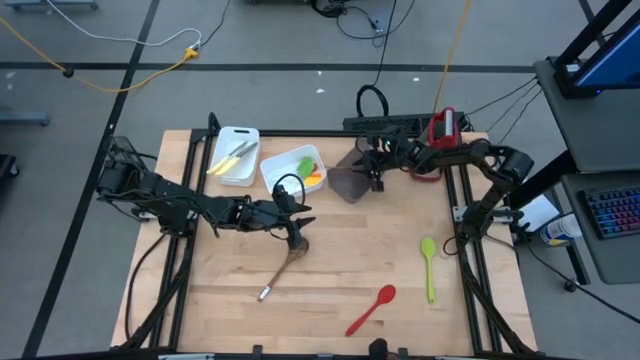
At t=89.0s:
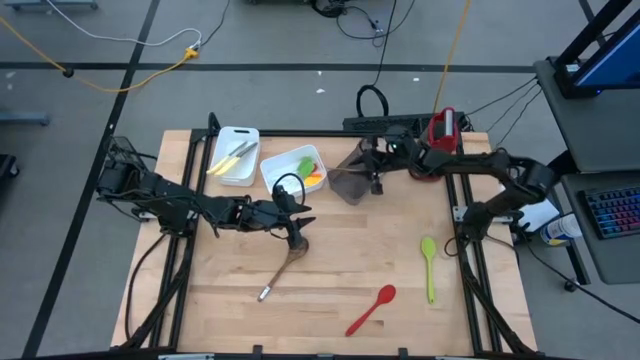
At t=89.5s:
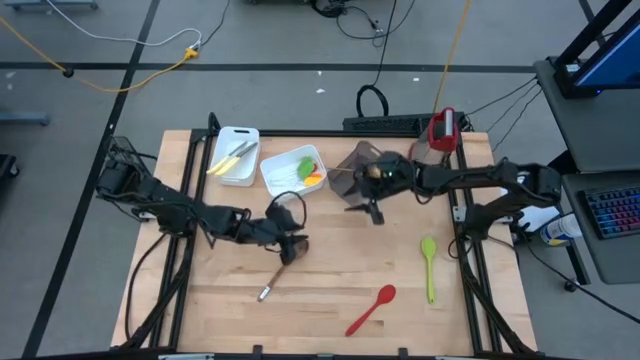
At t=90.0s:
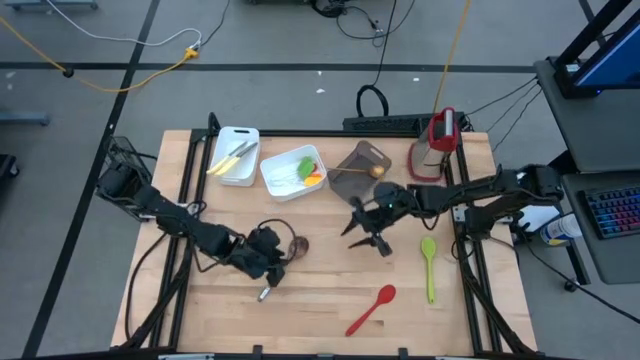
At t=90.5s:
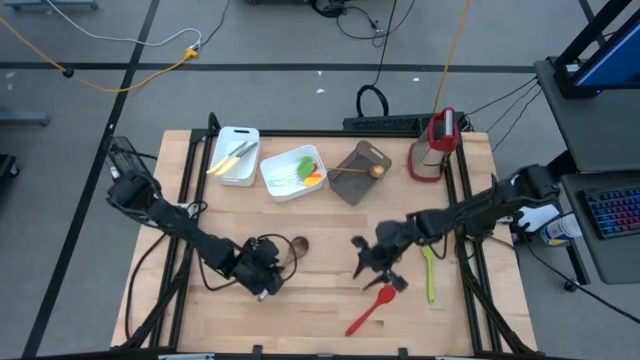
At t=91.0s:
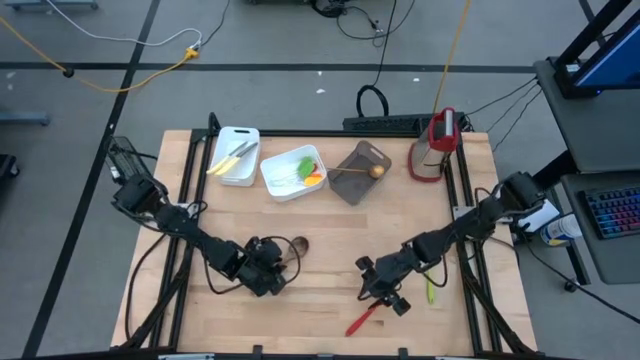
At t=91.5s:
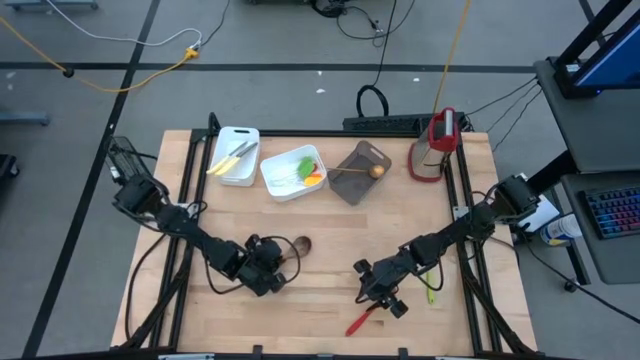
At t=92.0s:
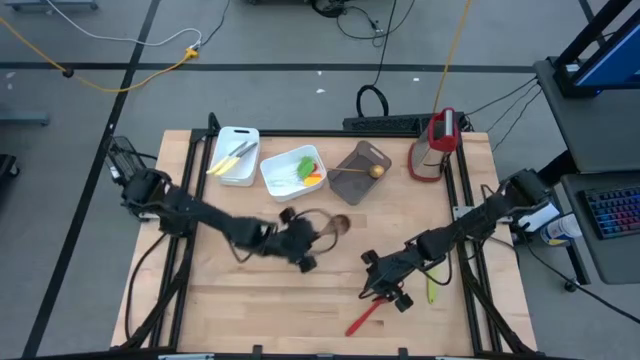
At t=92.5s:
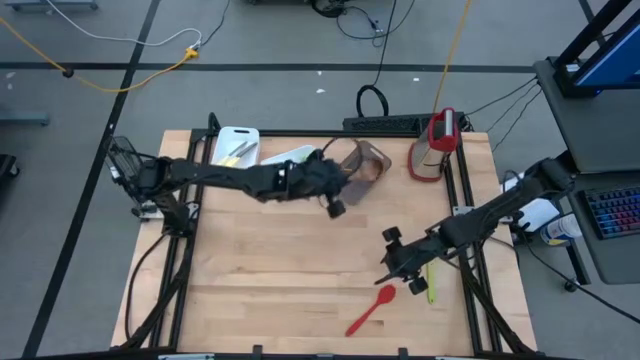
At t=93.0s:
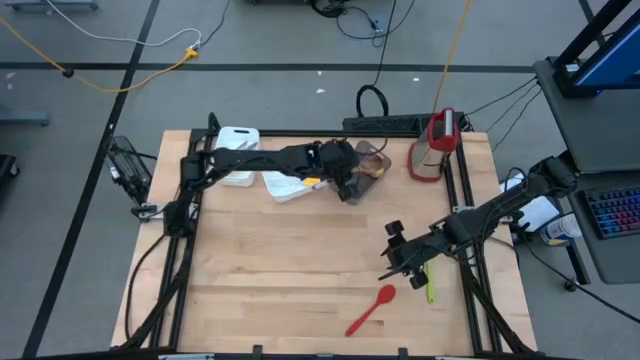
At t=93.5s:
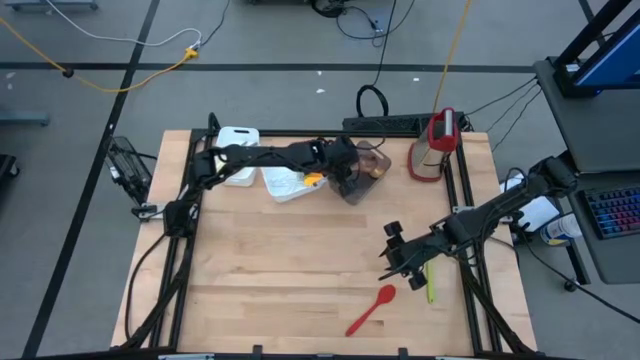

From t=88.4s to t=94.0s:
Task: Pick & Place Kitchen Items
Put the brown serving spoon into the black bin

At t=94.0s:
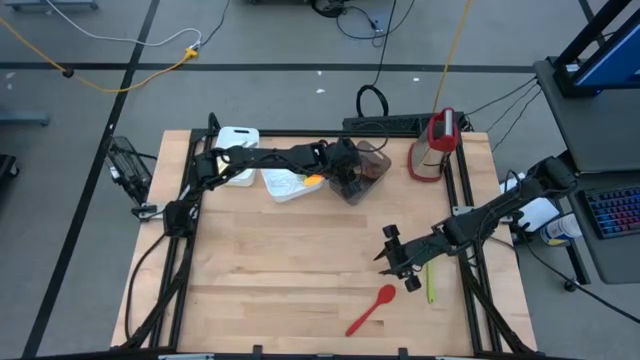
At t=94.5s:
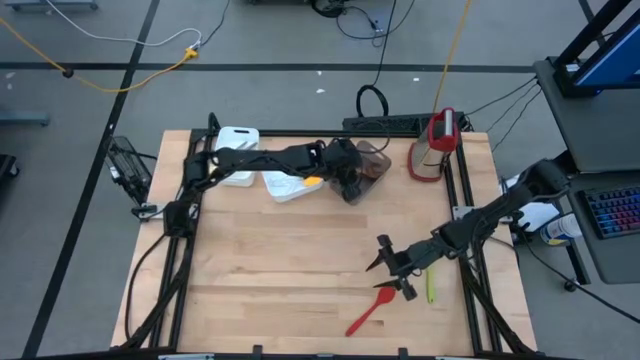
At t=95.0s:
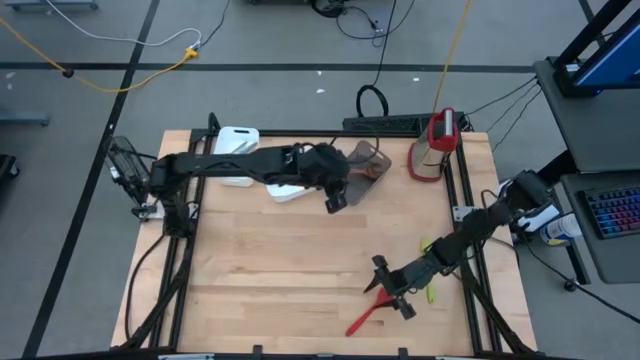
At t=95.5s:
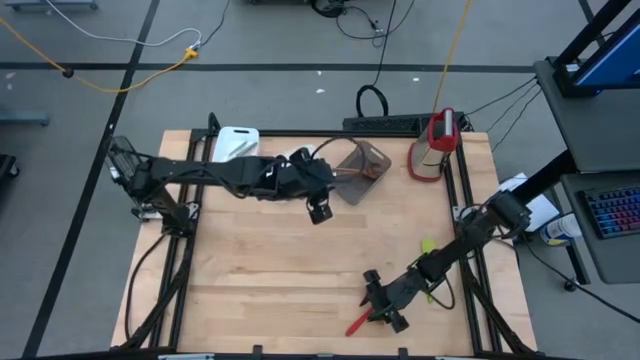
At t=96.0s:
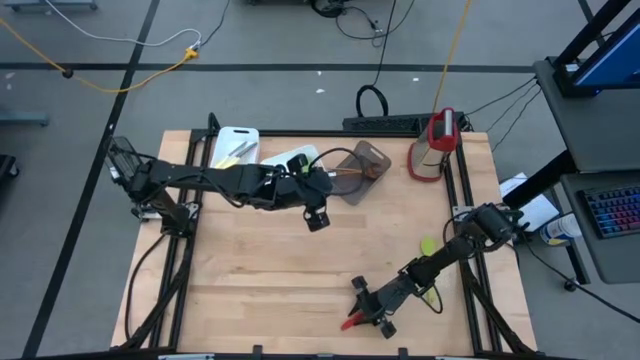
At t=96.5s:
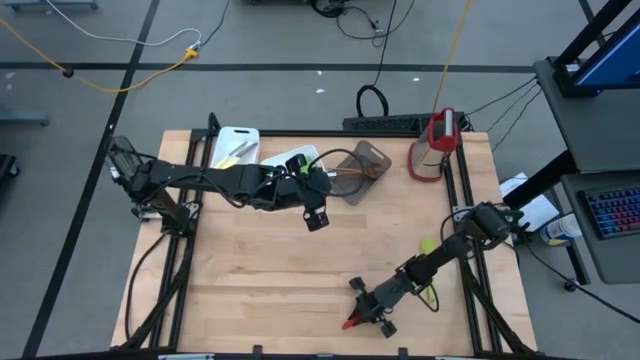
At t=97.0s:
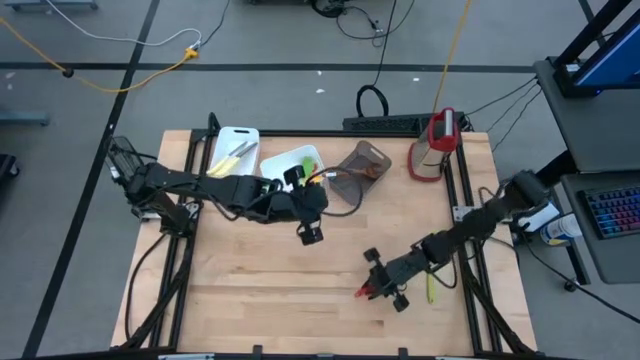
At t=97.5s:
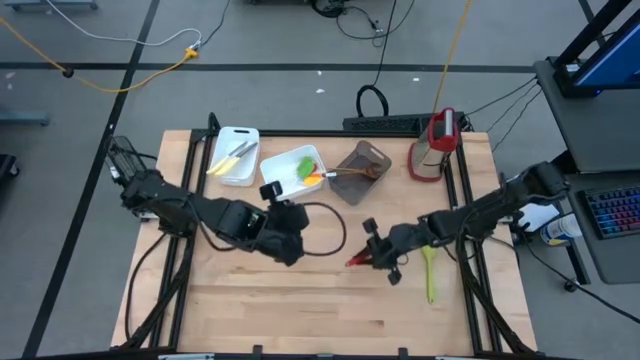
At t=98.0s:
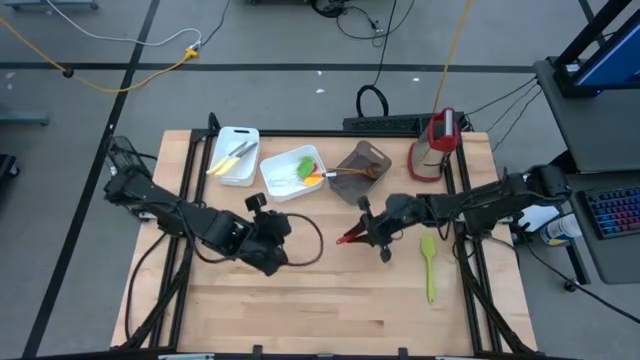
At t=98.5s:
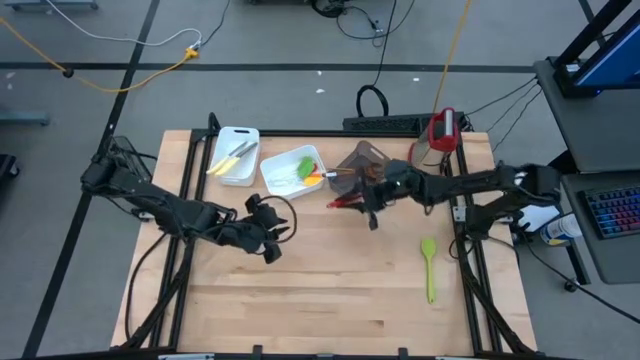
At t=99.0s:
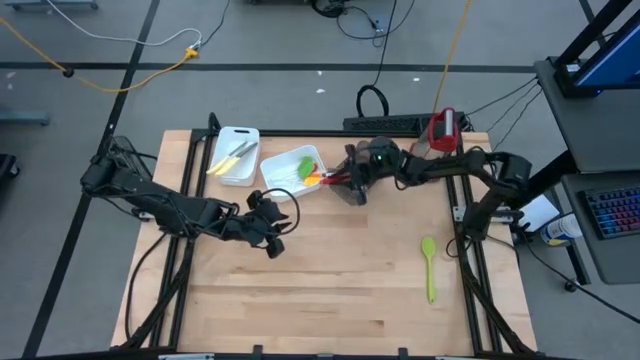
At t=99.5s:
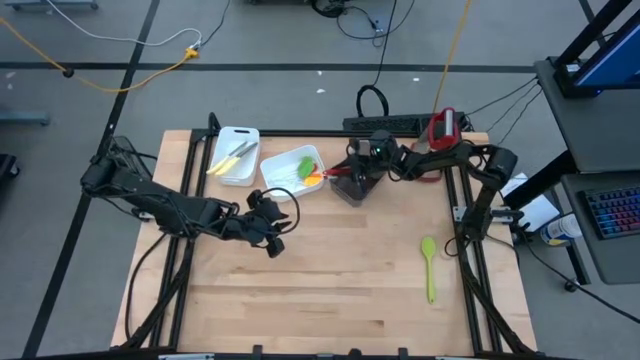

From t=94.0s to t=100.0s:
Put the red serving spoon into the black bin

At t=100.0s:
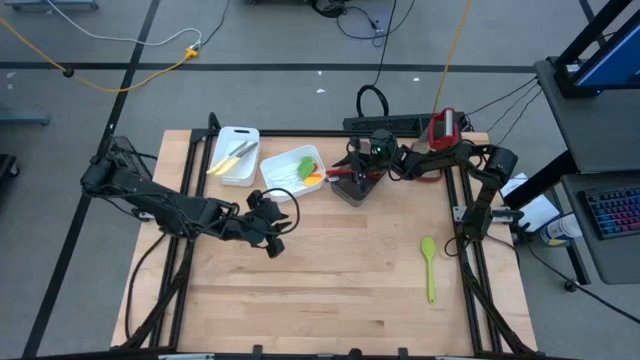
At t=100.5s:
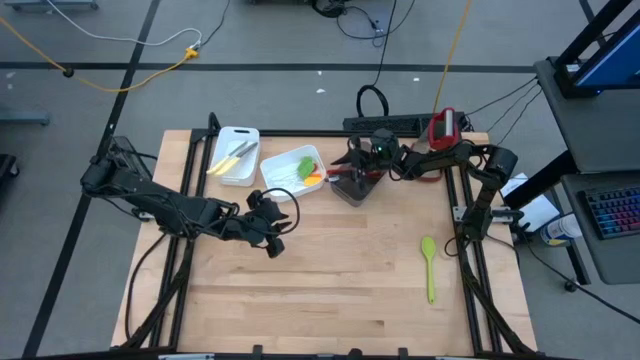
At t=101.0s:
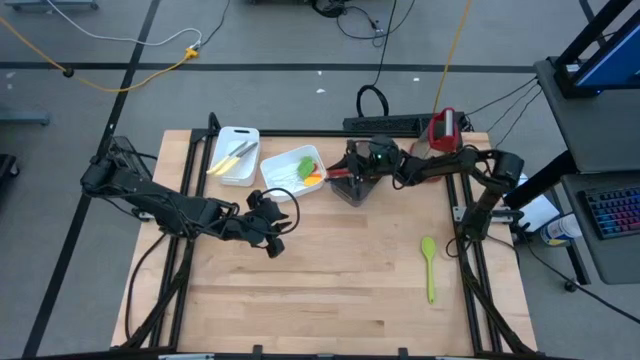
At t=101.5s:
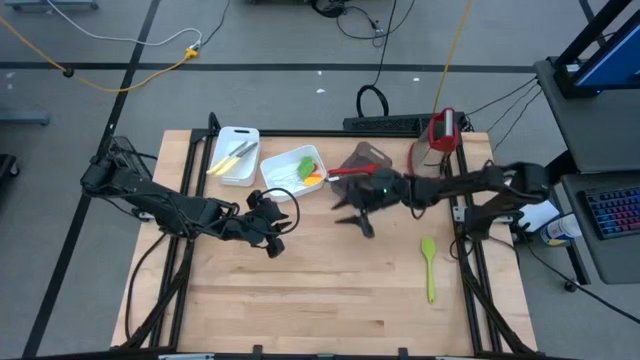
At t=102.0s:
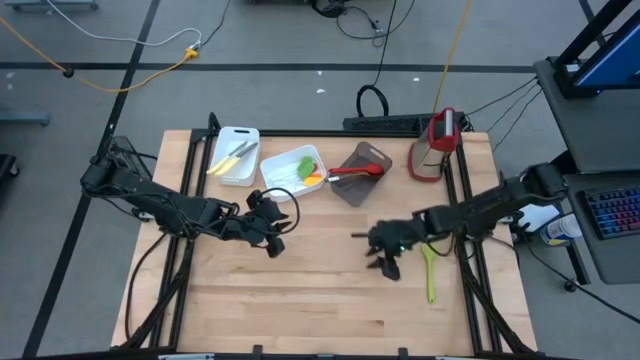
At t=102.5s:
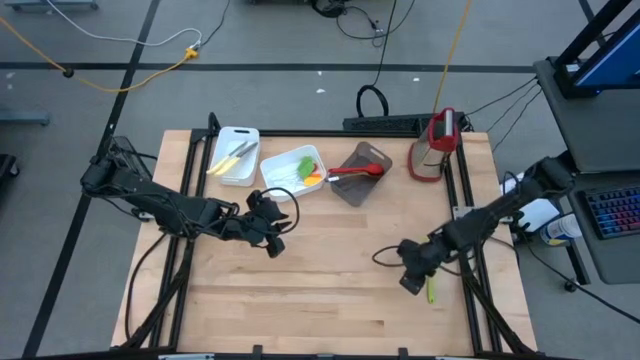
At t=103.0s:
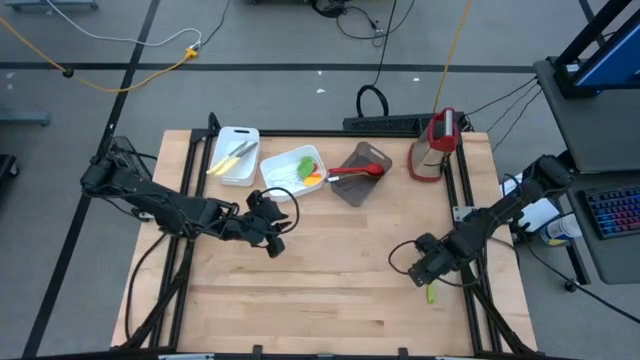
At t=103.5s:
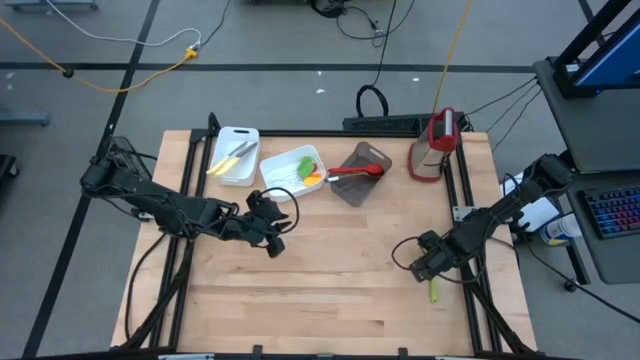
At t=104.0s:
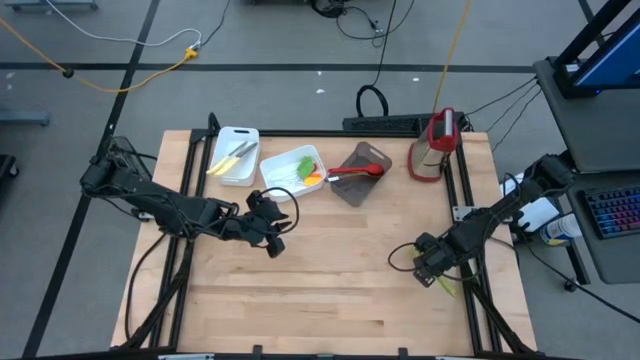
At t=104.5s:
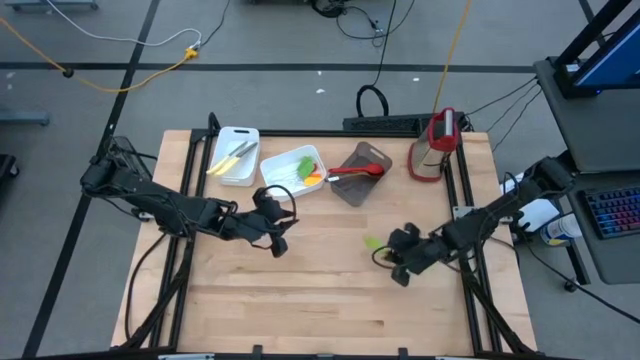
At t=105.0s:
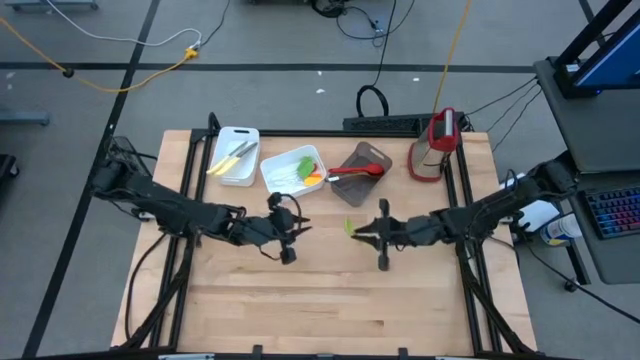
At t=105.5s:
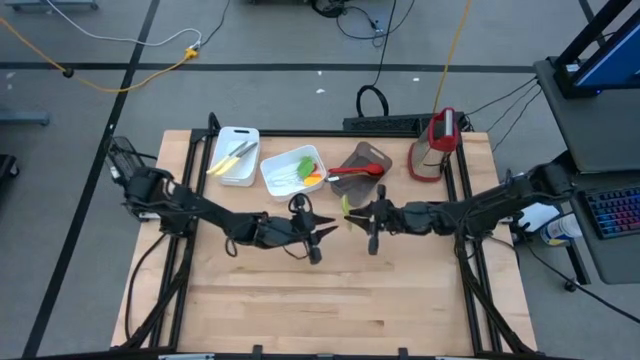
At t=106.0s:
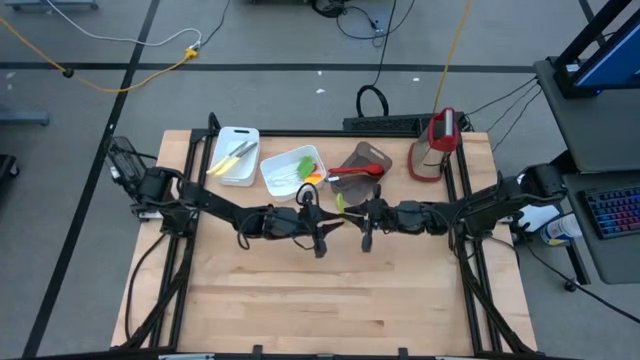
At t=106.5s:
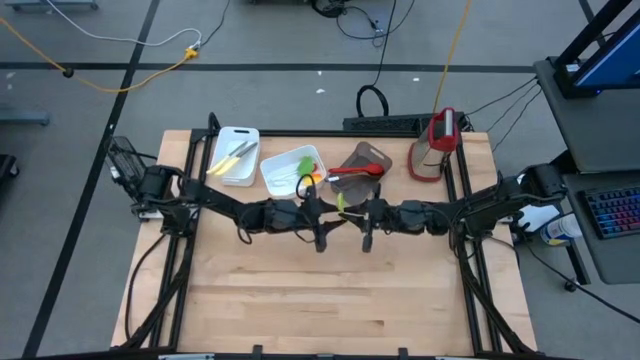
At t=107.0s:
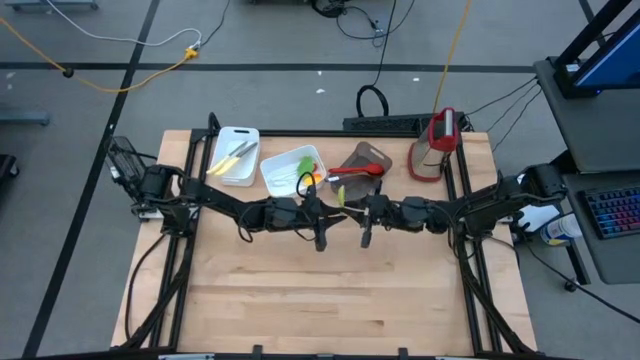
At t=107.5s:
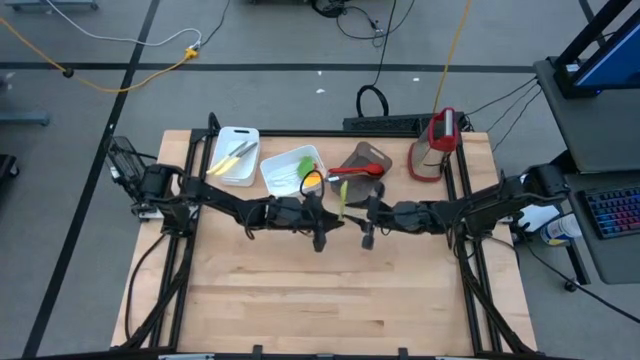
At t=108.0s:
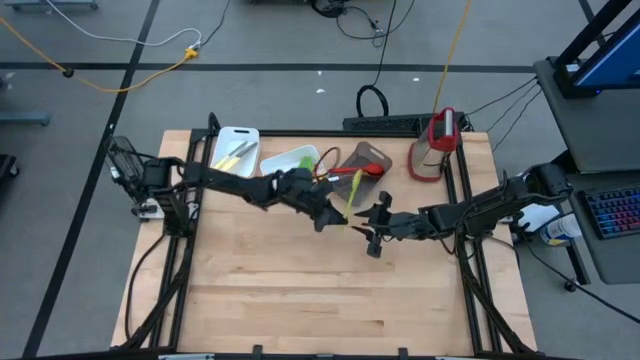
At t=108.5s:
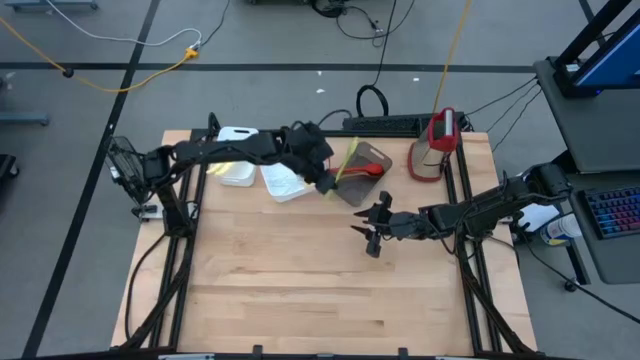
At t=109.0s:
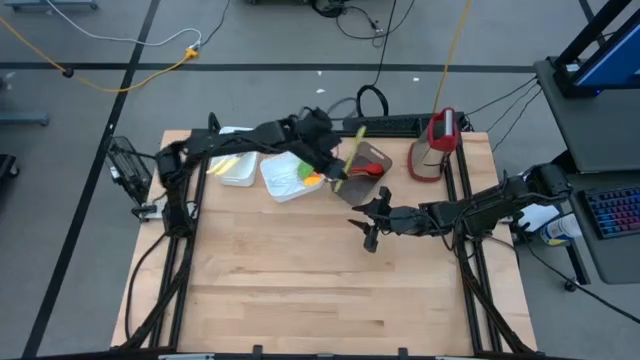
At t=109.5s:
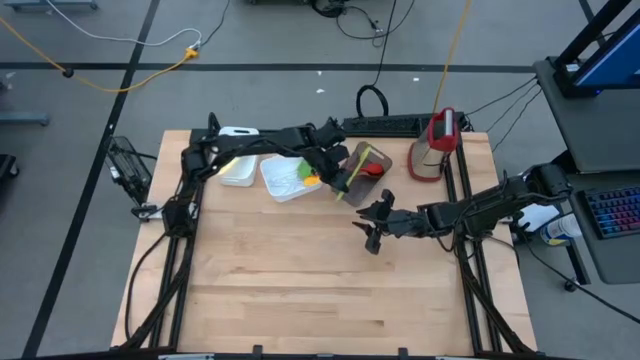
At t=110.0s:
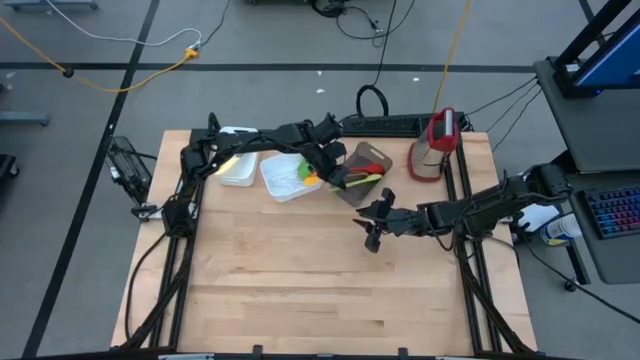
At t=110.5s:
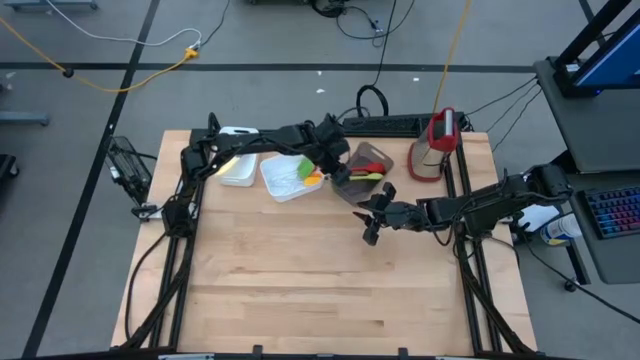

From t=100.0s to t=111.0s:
Put the green serving spoon into the black bin
